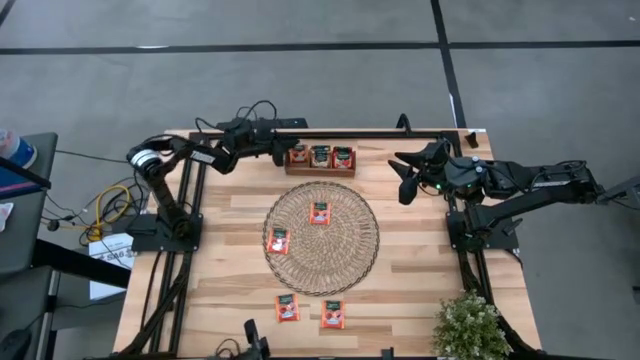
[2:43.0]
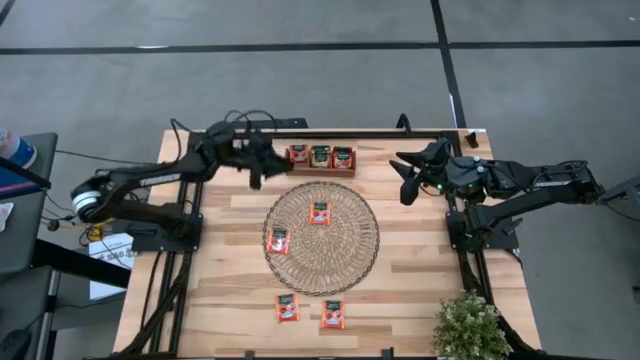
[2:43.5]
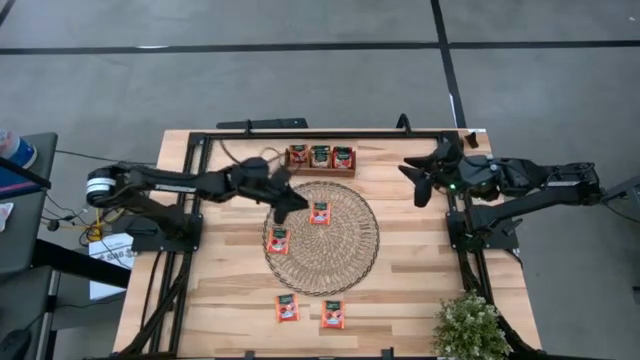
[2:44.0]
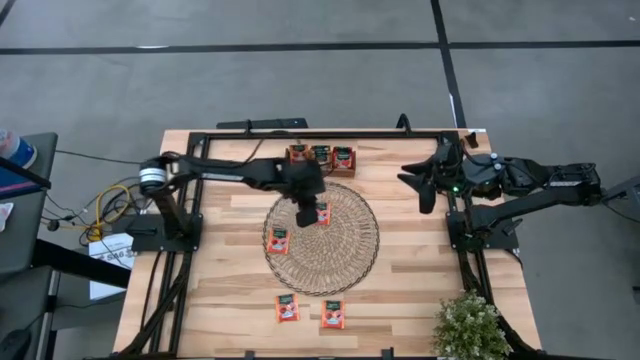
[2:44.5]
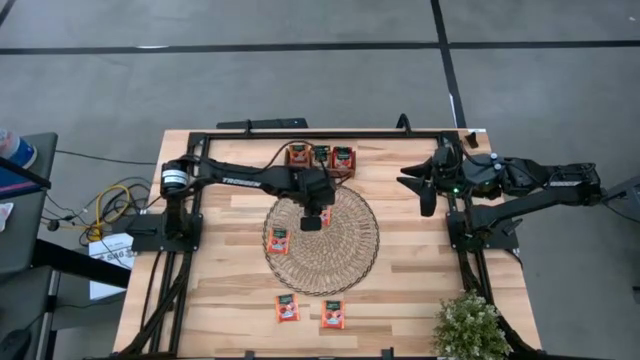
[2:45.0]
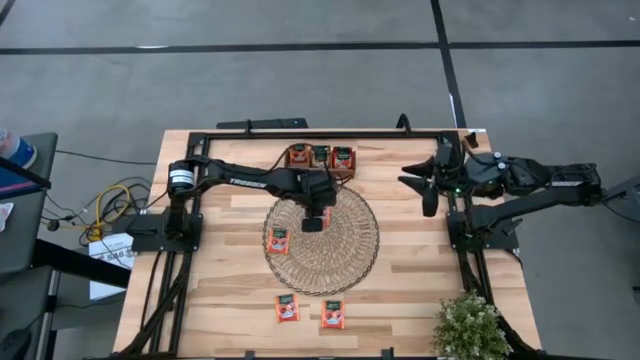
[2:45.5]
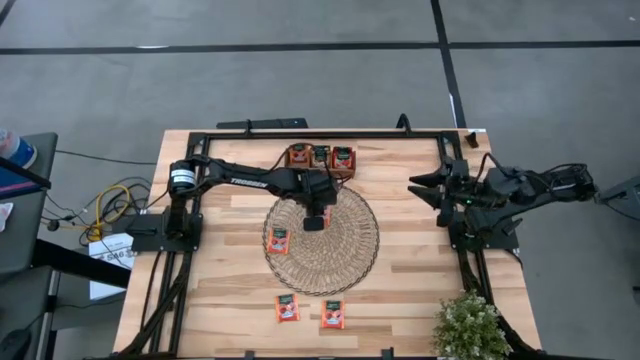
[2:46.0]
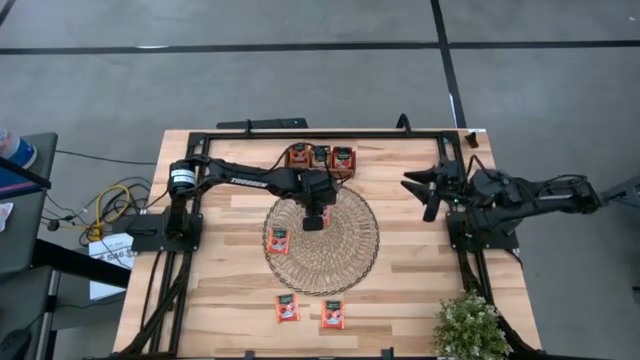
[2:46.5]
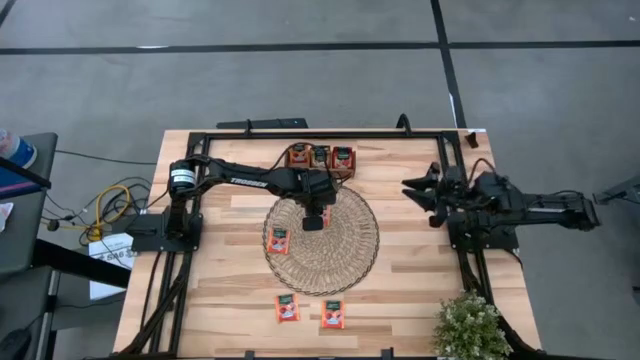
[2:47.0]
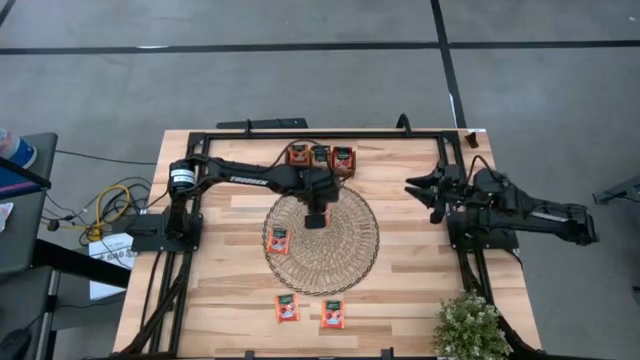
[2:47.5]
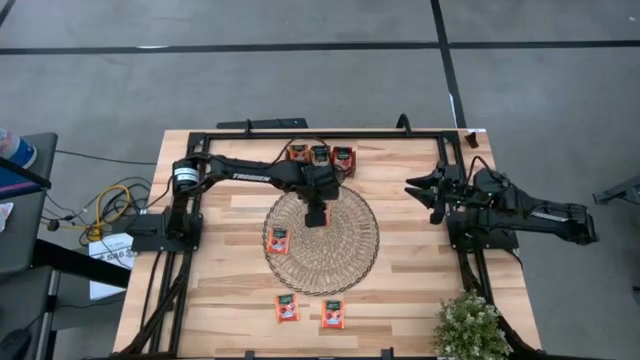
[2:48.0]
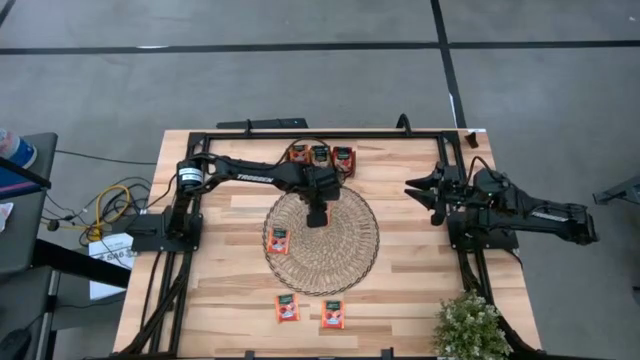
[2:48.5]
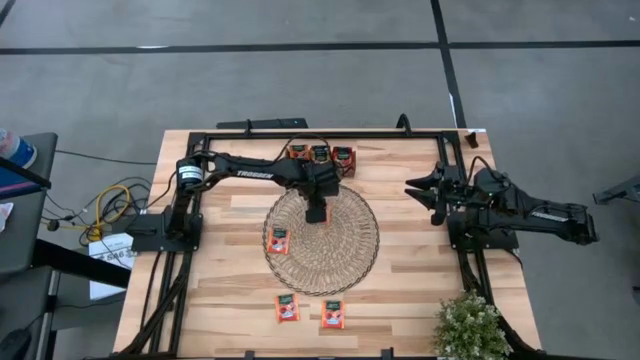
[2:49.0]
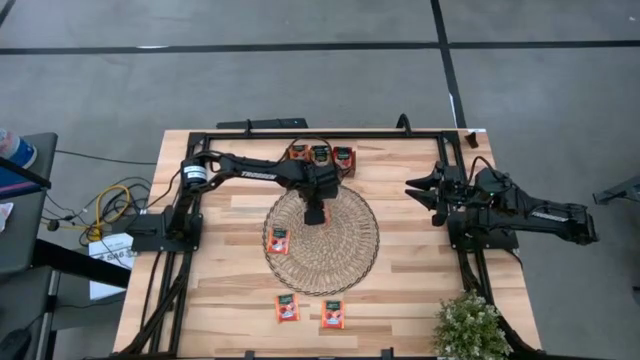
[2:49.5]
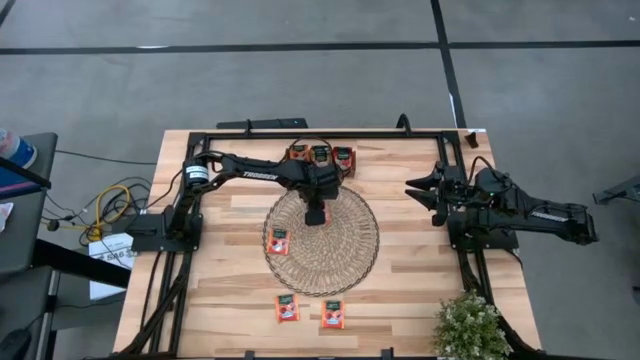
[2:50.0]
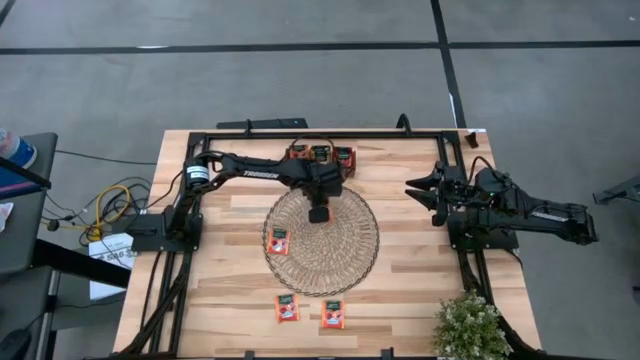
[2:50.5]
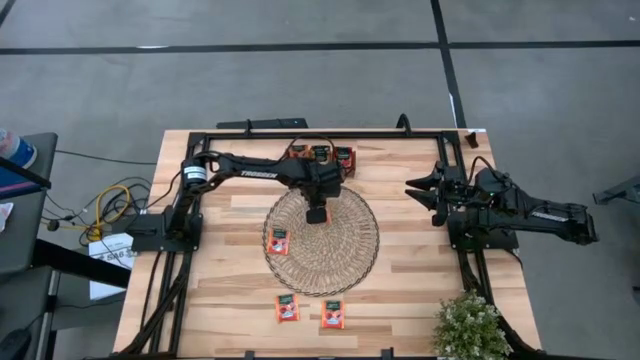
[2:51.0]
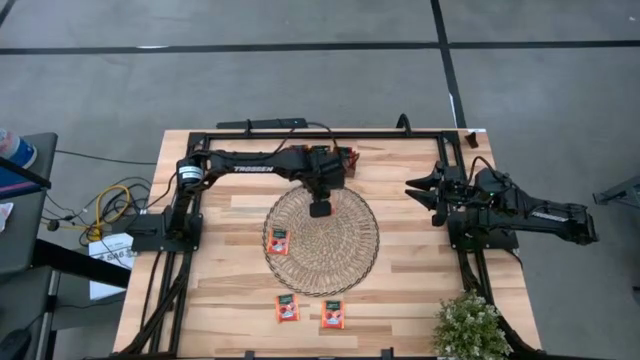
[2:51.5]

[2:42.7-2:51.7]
Task: Pick & Place Tea
Put the orange tea bag into the left section of the wooden organizer

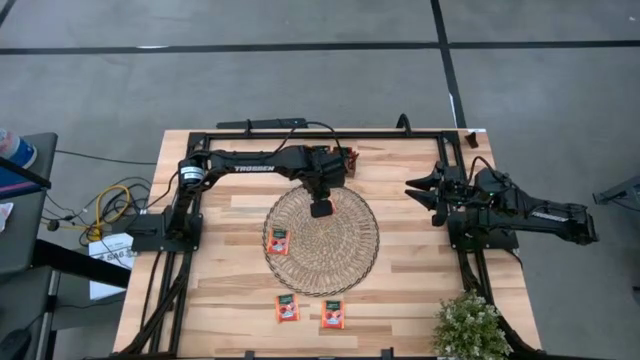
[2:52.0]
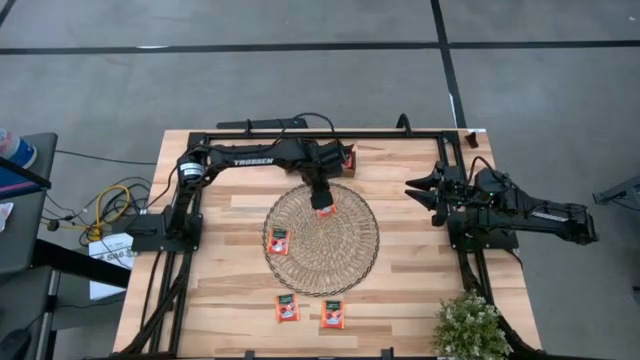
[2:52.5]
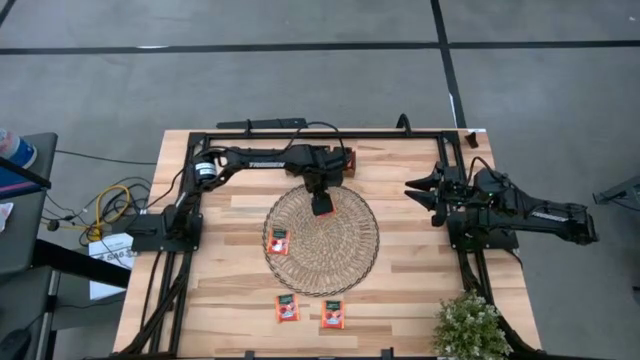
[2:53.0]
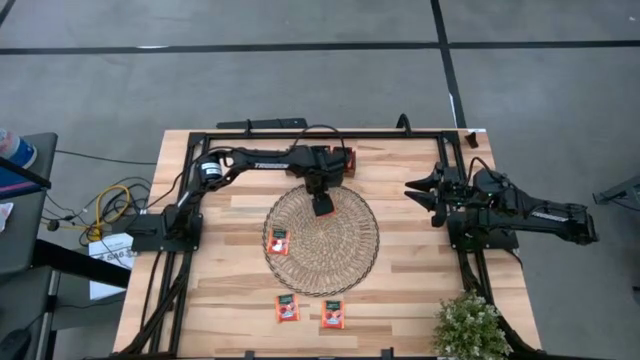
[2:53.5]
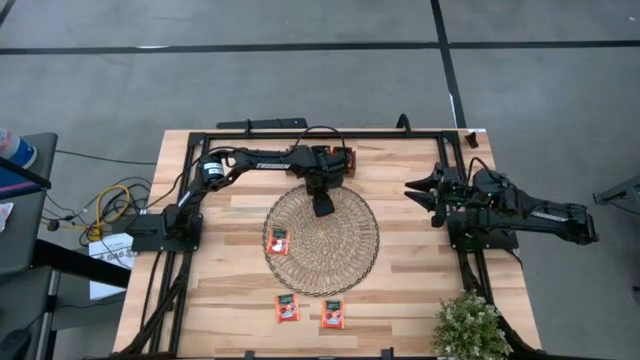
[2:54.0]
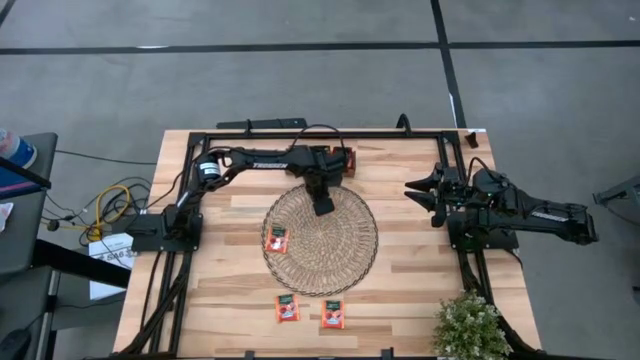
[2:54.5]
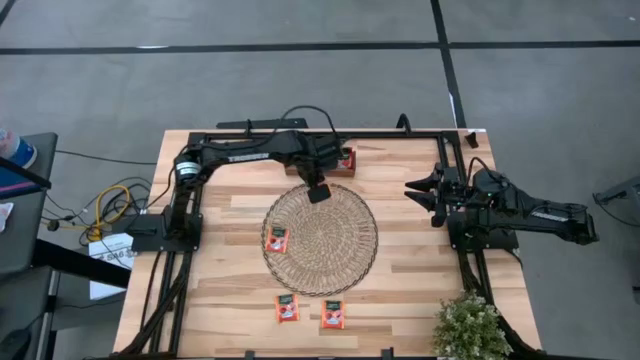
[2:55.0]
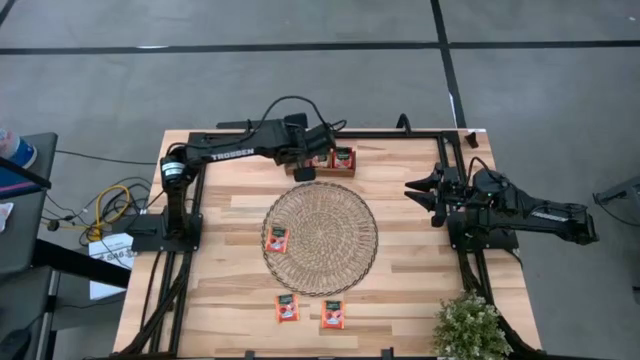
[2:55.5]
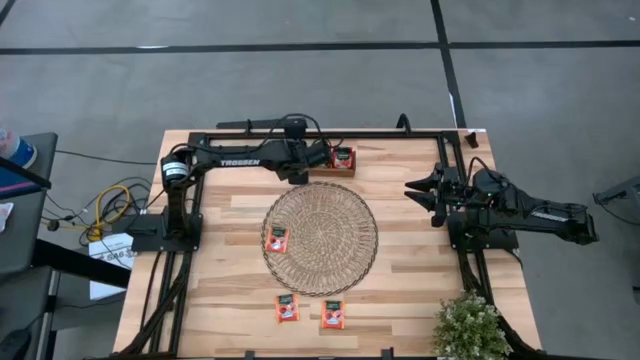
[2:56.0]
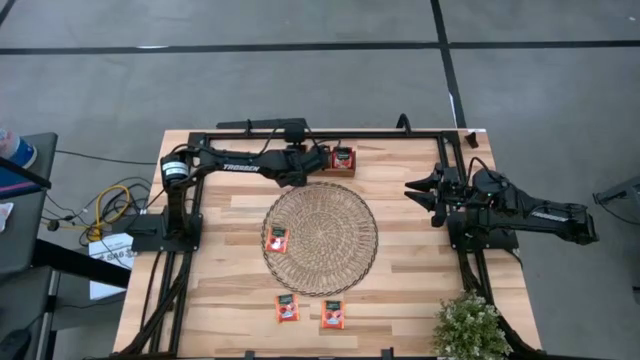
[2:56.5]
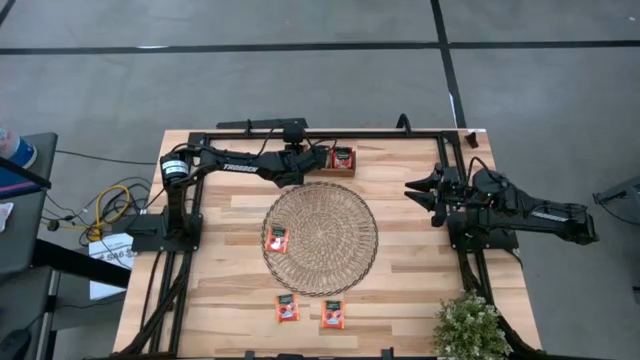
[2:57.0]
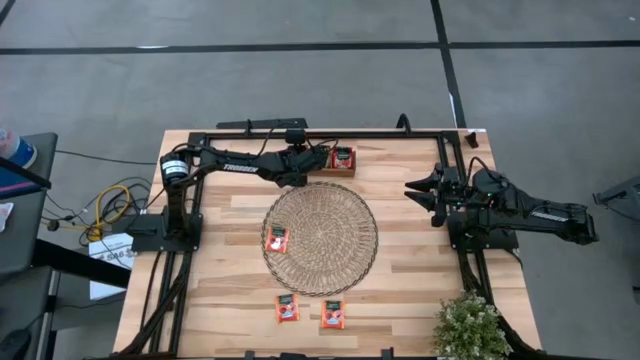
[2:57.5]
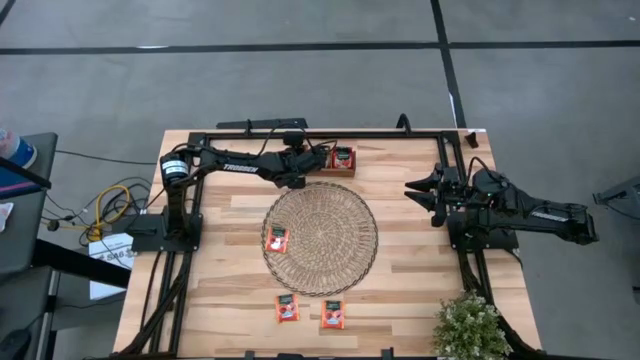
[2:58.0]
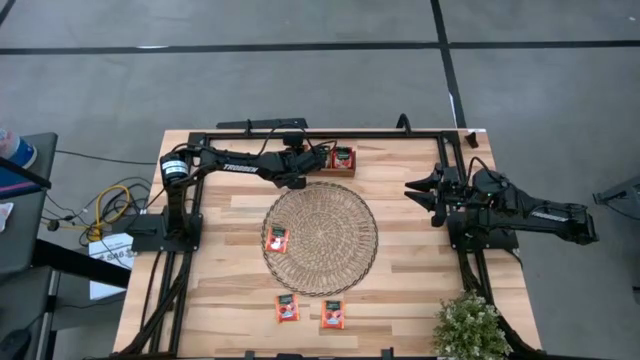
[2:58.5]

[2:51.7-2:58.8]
Put the orange tea bag into the left section of the wooden organizer

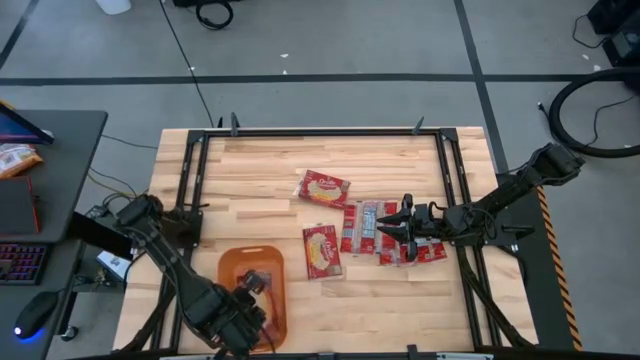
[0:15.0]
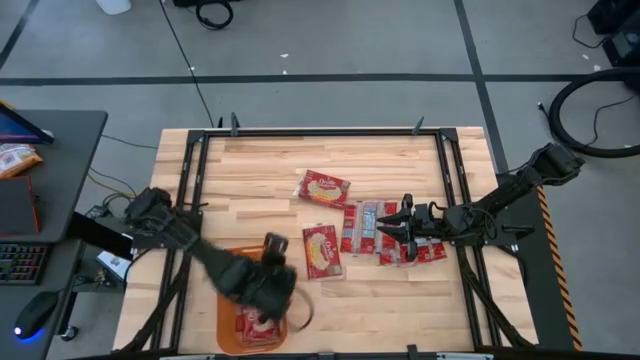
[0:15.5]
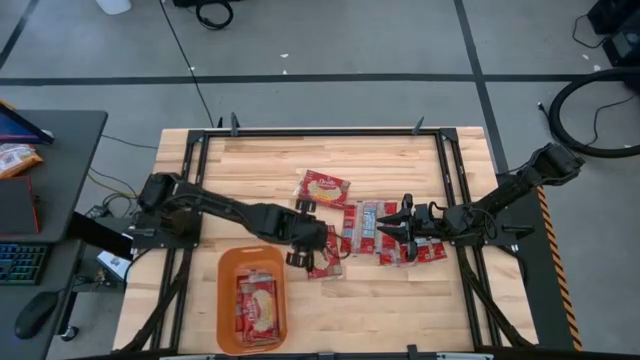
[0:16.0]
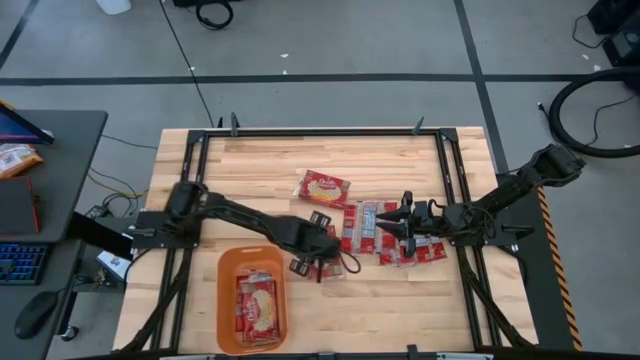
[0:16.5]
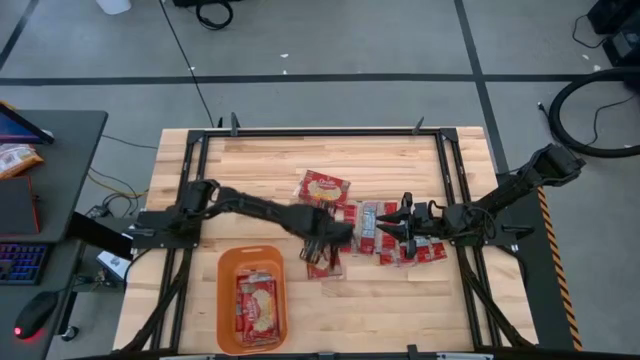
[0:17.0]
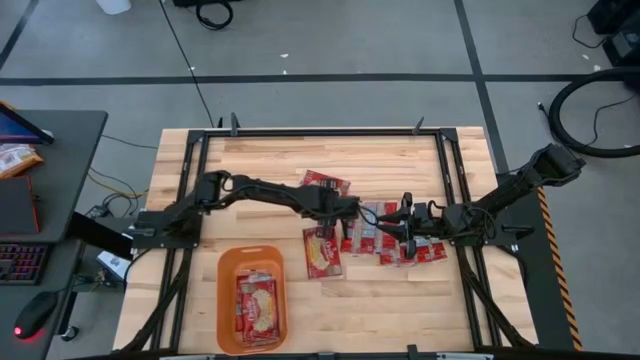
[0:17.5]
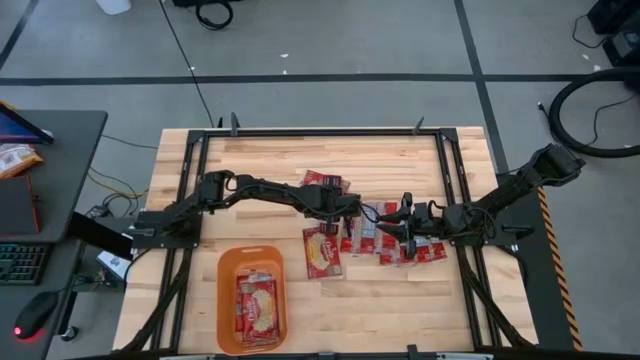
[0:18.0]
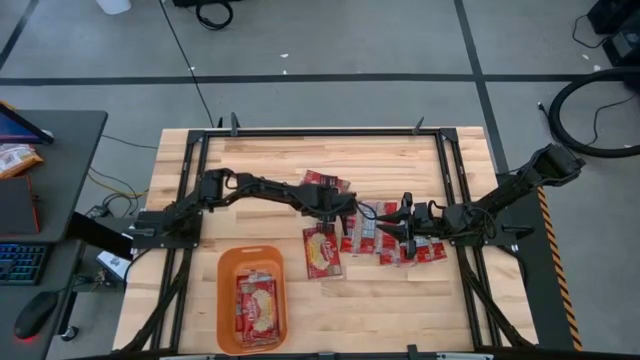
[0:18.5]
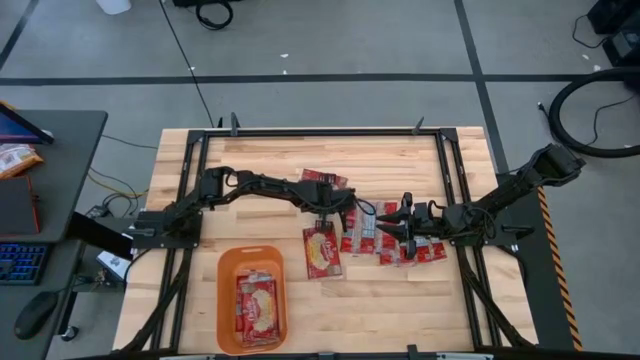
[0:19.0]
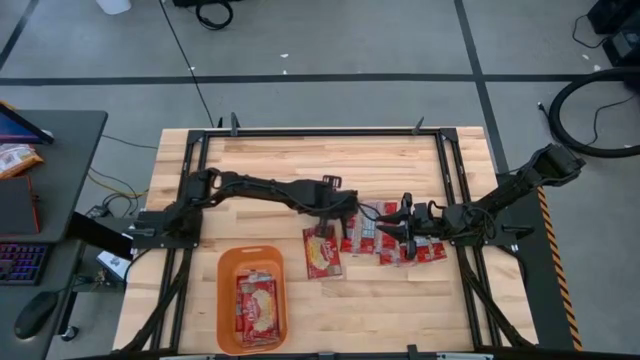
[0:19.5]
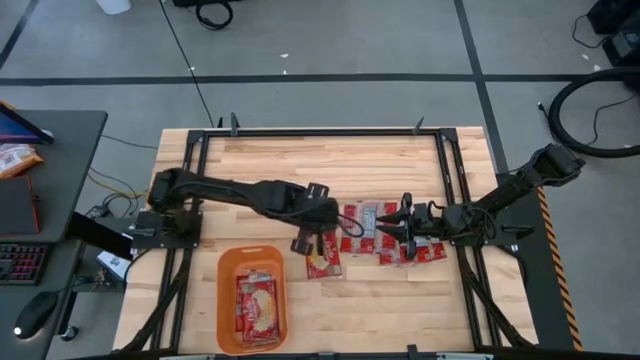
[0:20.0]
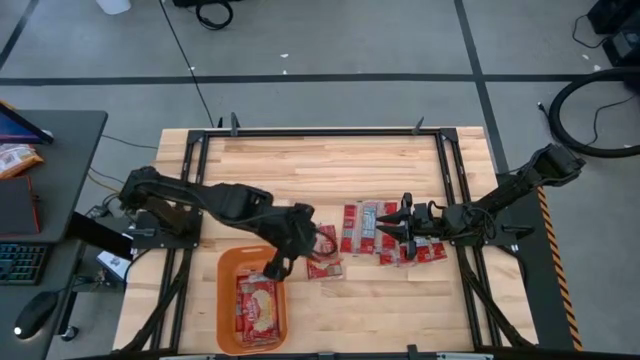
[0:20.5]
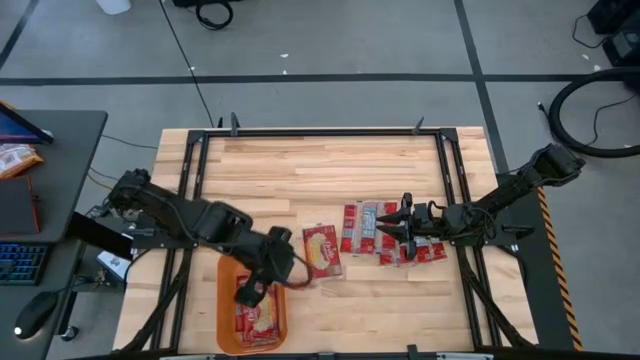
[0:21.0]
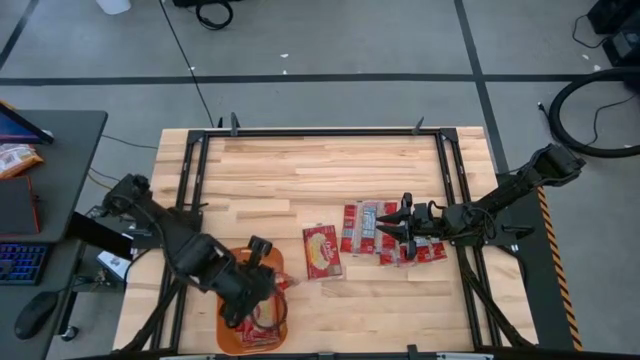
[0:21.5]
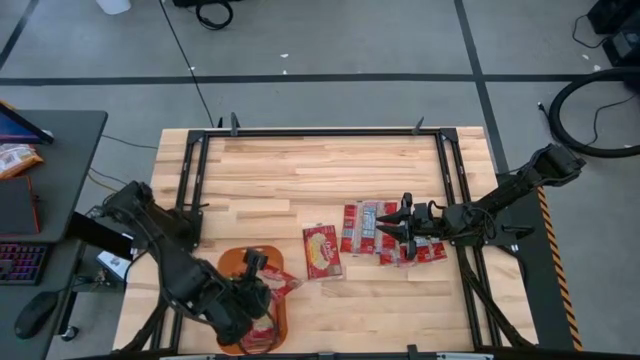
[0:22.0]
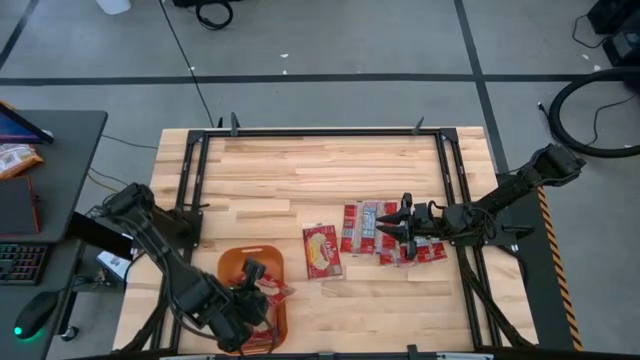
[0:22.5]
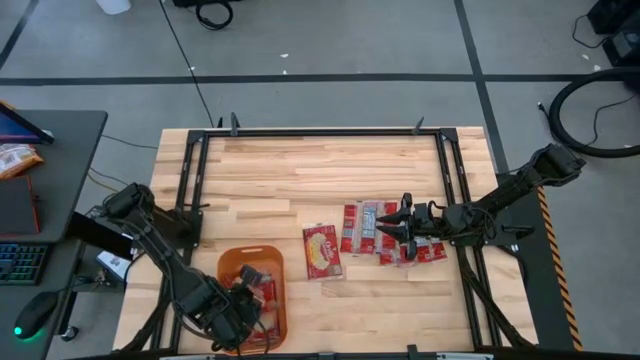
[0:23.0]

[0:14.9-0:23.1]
Task: Sort popcorn bags into baskets
Put the red popcorn pack into the orange bin
